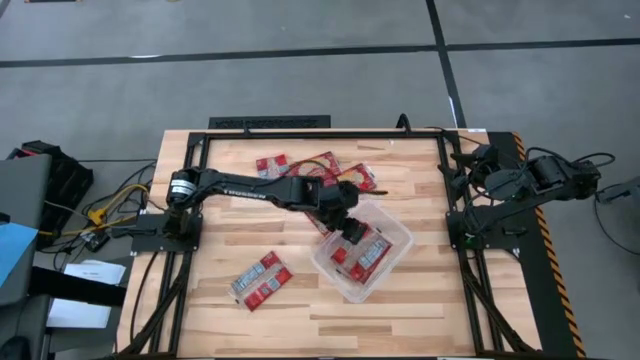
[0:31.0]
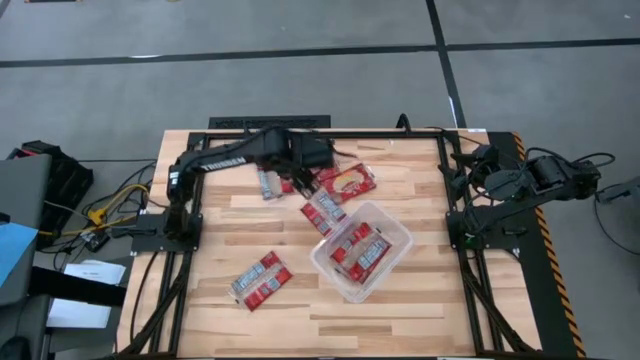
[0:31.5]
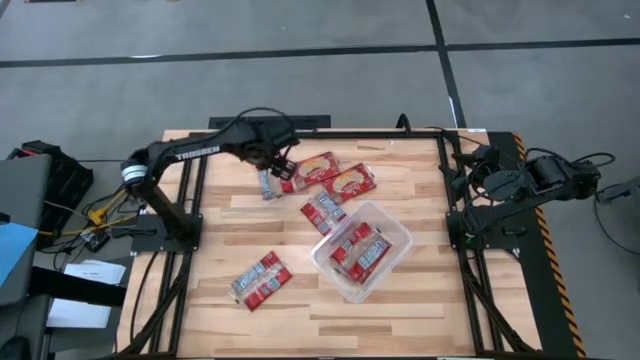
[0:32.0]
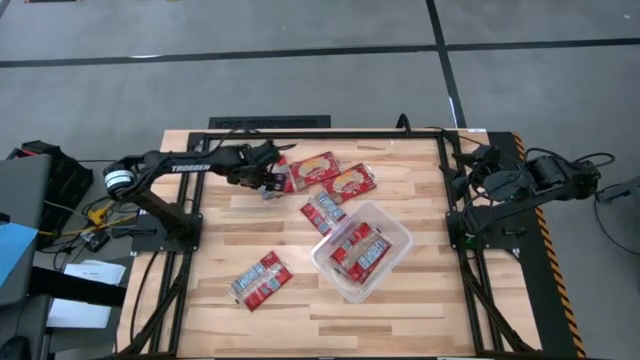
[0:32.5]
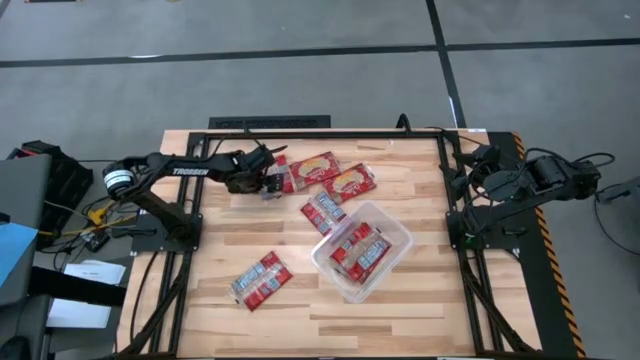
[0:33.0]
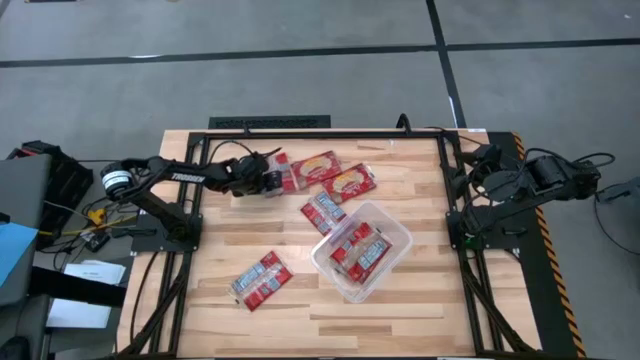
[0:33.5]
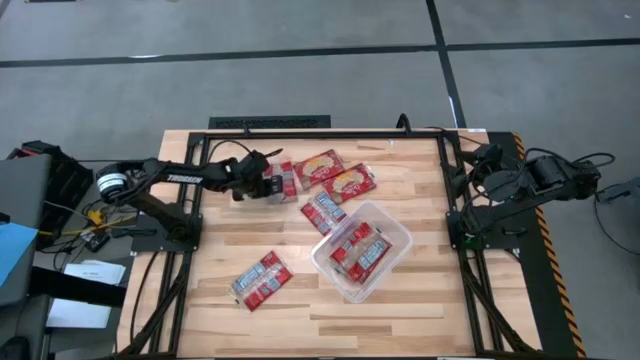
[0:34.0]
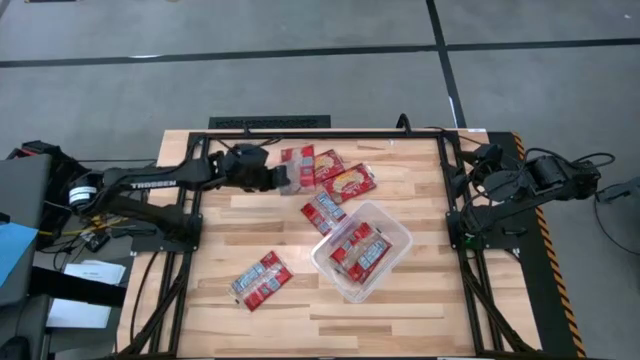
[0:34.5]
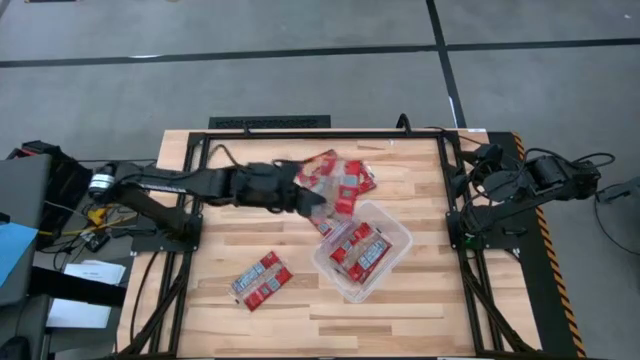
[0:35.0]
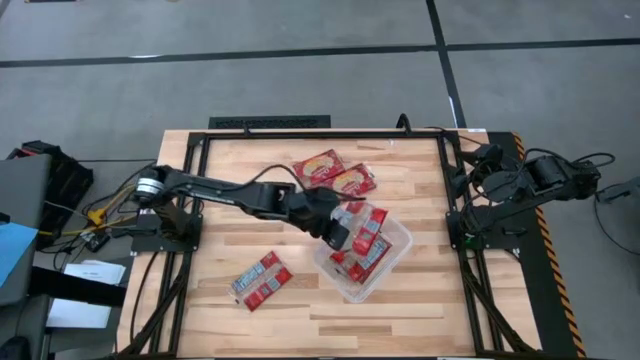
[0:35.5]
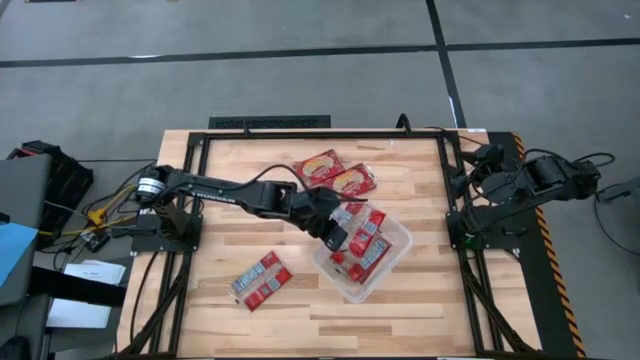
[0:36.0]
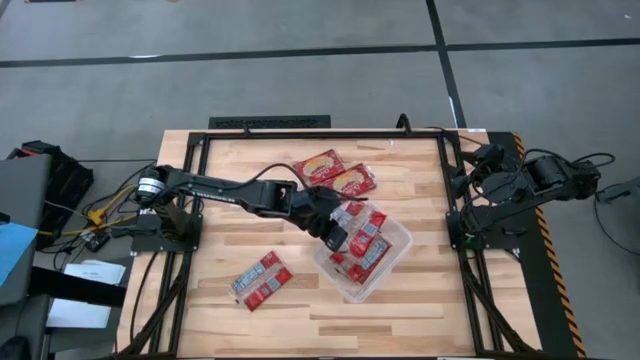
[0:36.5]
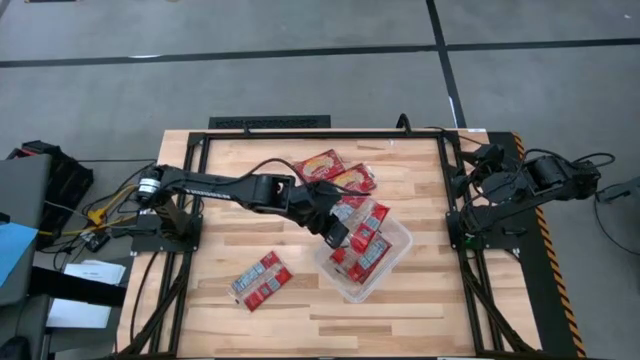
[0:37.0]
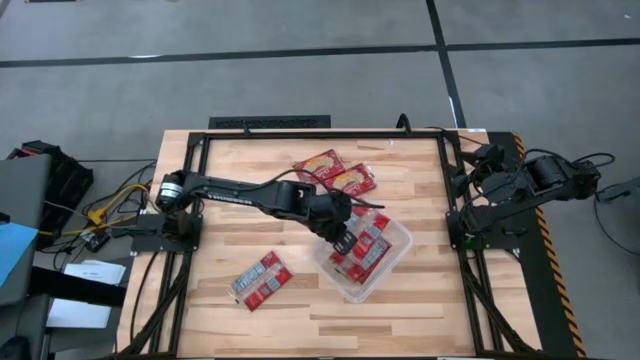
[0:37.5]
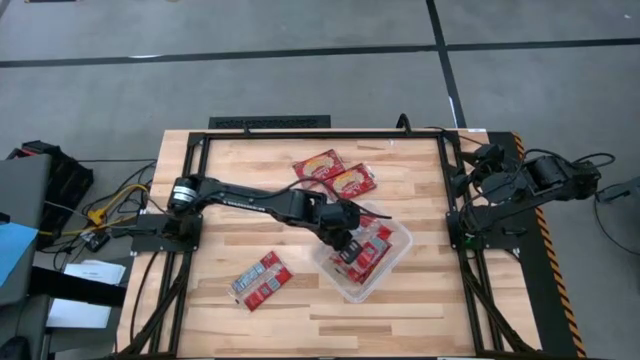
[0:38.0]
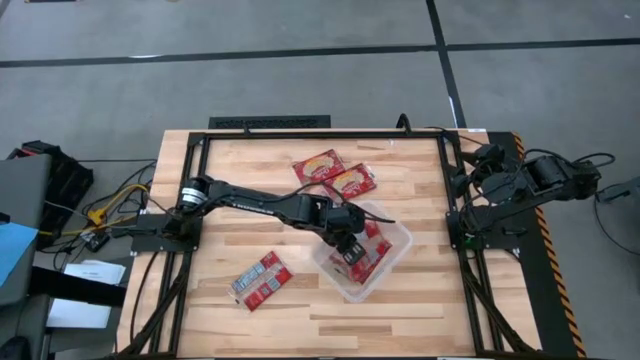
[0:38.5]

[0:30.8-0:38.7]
Task: Sort popcorn bags into baskets
Put the red popcorn pack into the transparent container

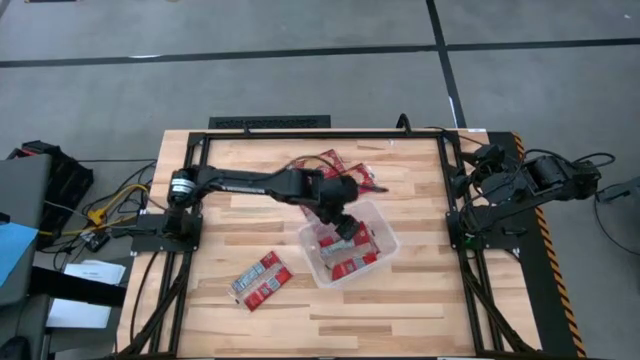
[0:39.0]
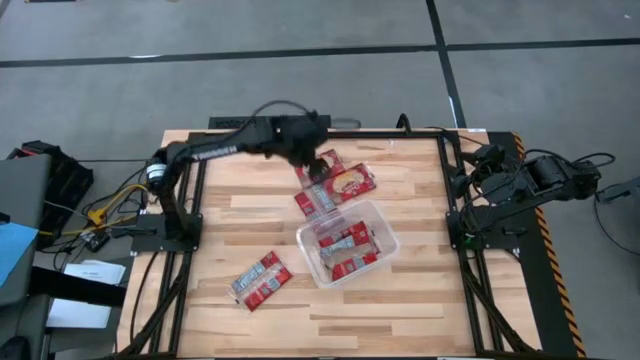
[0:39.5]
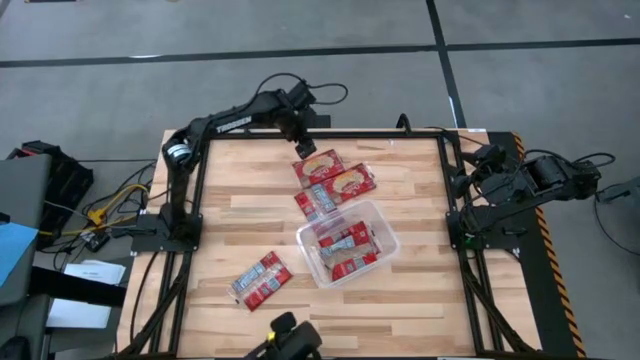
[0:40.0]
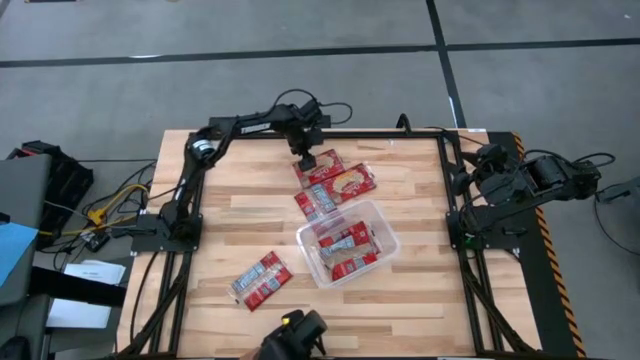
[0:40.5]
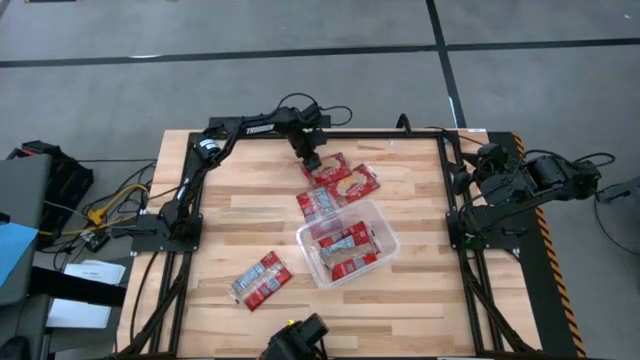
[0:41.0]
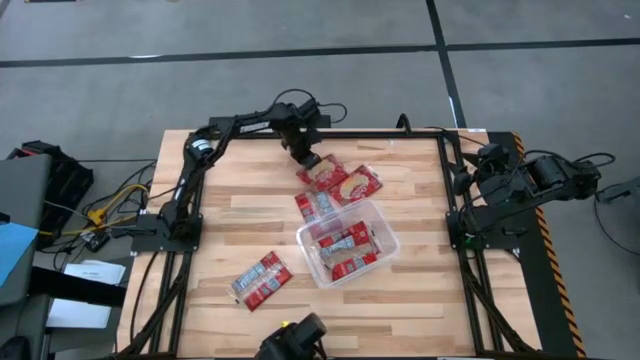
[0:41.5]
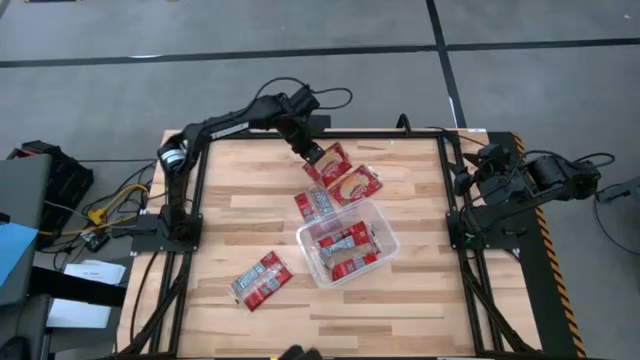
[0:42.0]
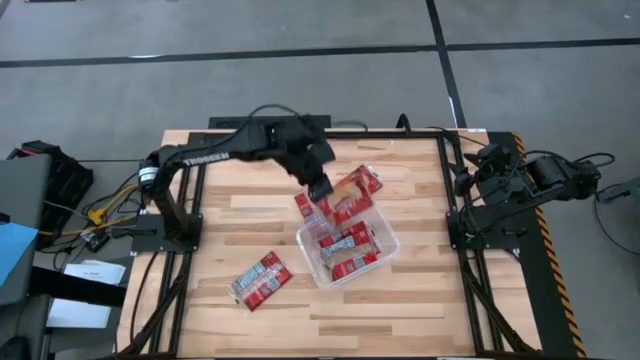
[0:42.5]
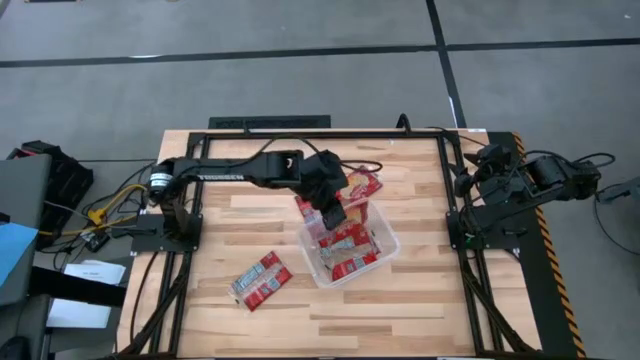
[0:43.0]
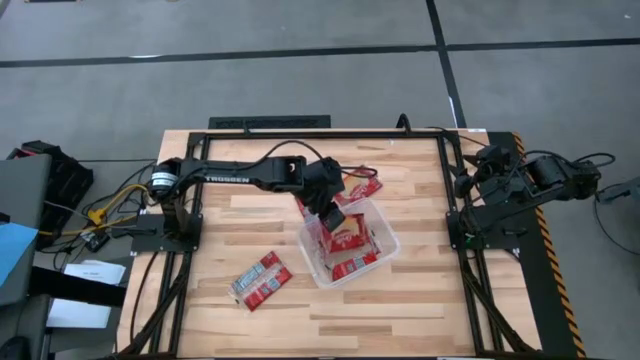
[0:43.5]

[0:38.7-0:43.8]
Put the red popcorn pack into the transparent container

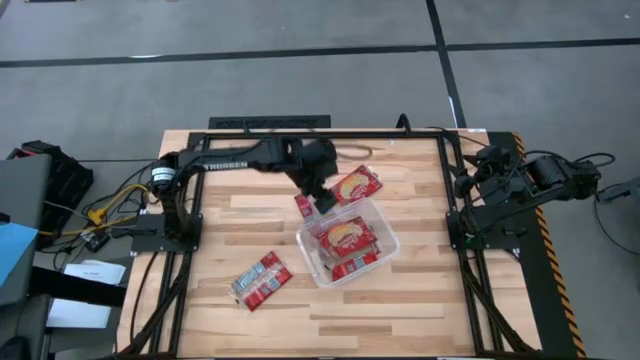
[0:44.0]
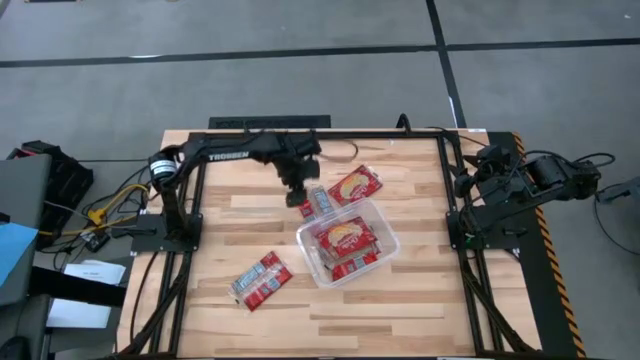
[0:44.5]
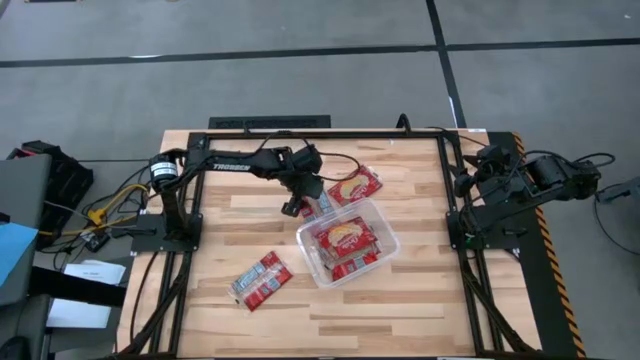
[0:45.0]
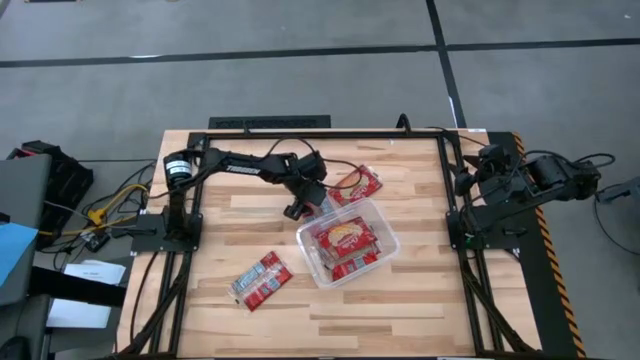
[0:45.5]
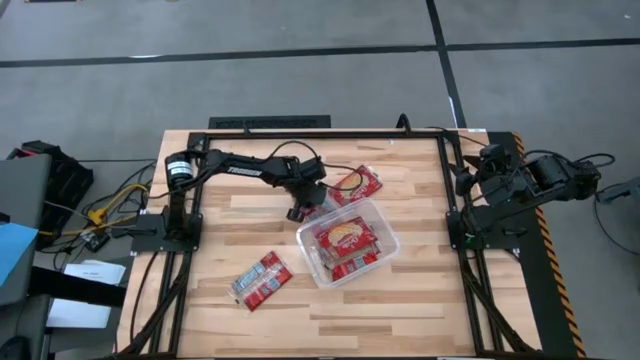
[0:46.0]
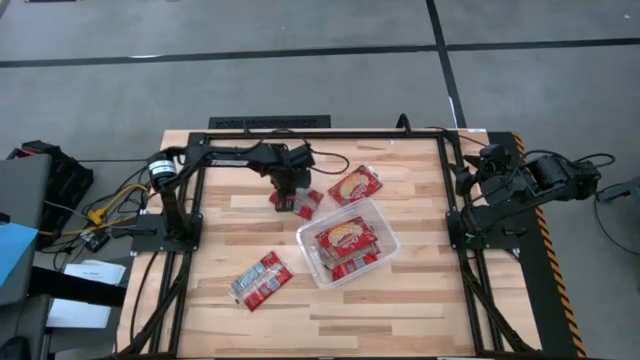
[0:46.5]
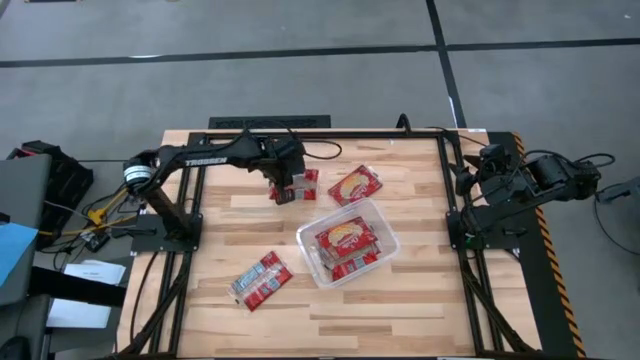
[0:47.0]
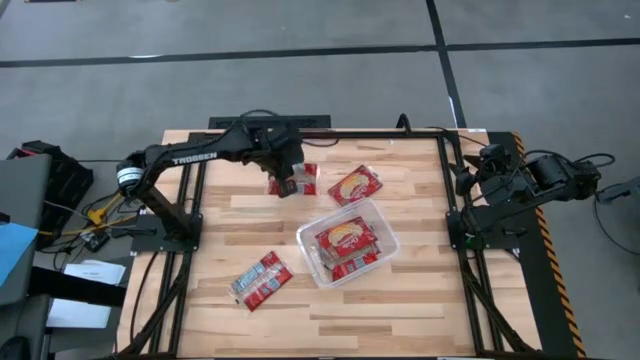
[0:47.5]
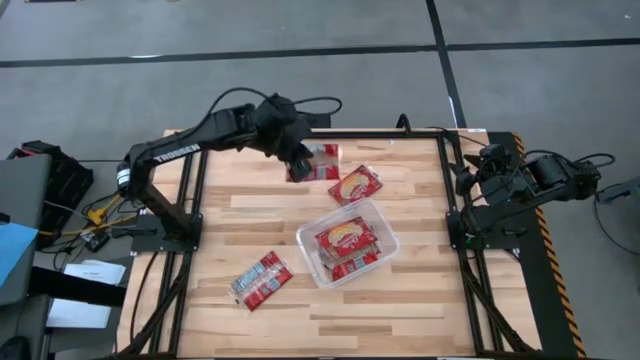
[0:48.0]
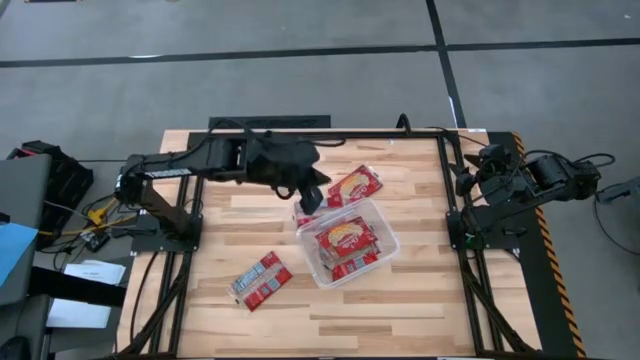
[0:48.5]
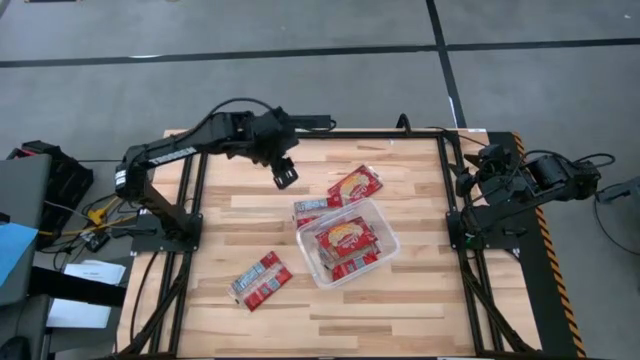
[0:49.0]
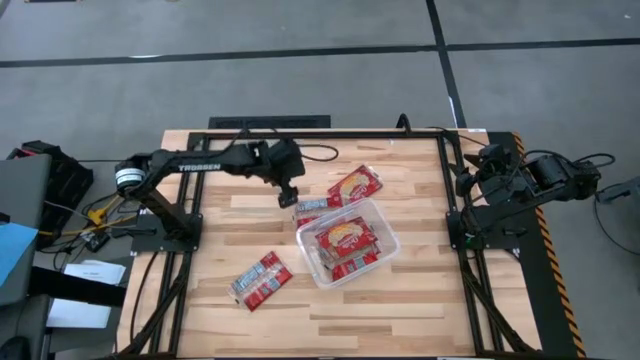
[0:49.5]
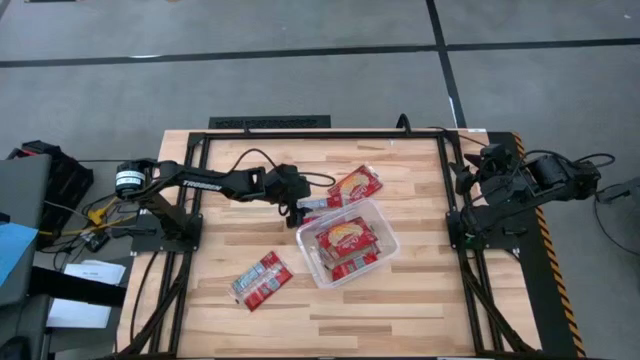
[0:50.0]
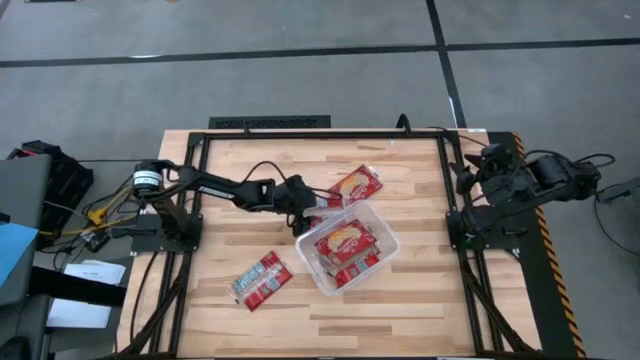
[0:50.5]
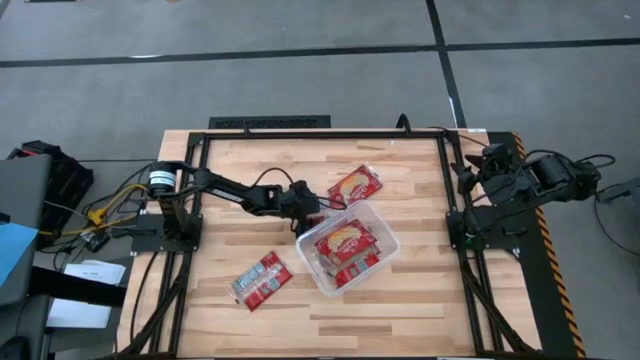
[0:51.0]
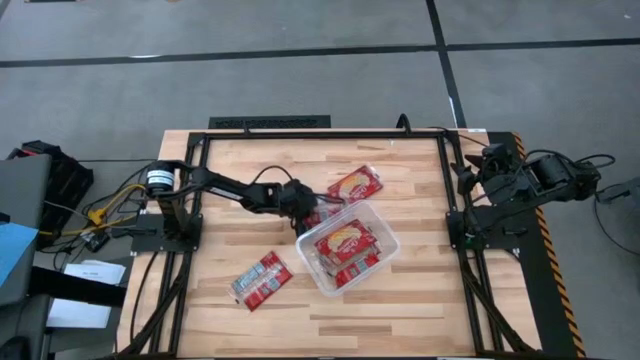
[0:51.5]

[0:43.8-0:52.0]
Put the red popcorn pack into the transparent container

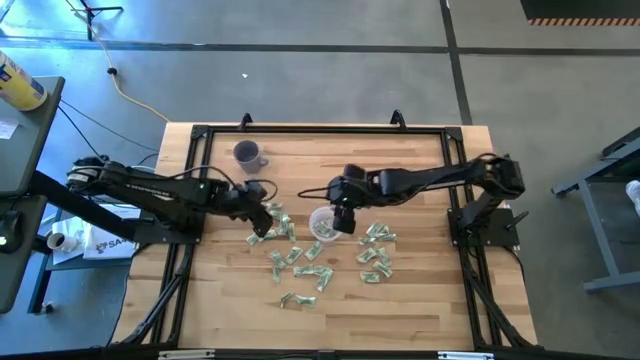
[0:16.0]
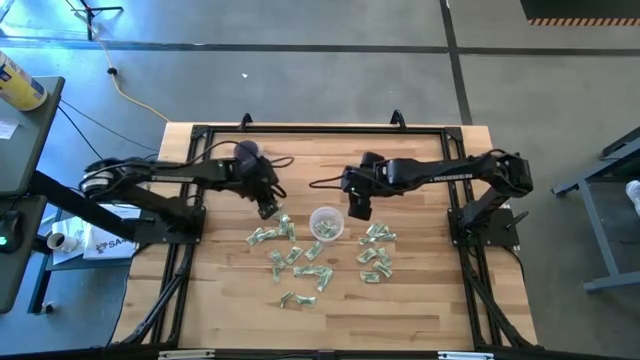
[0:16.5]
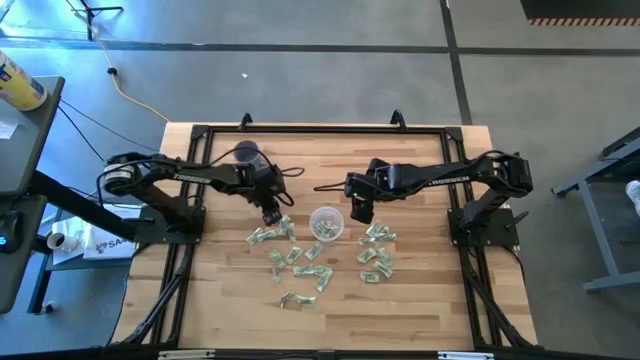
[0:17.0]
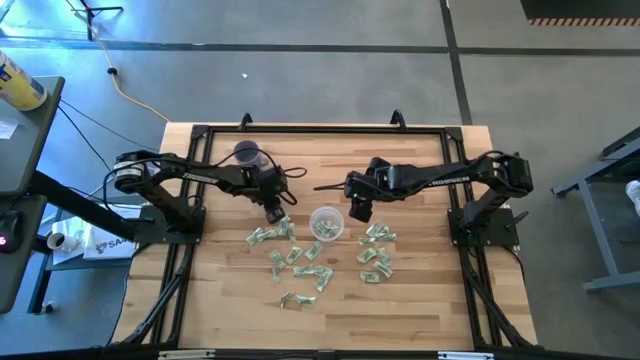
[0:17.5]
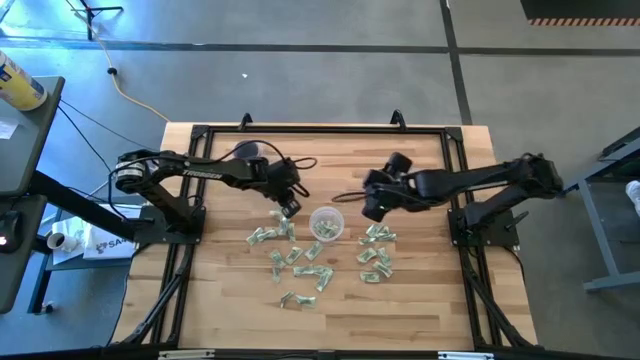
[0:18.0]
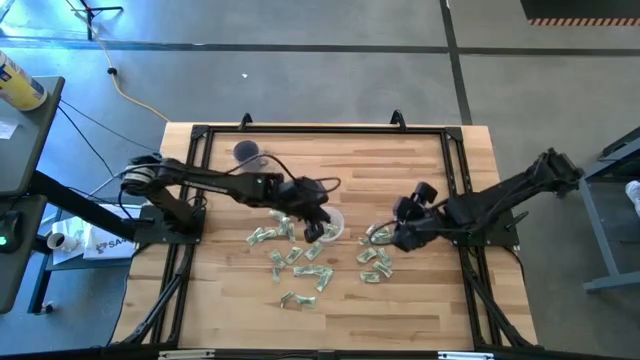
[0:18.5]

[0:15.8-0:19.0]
Task: Pick and place Stevia / Truvia into bins
Put the stevia packet into the transparent container
